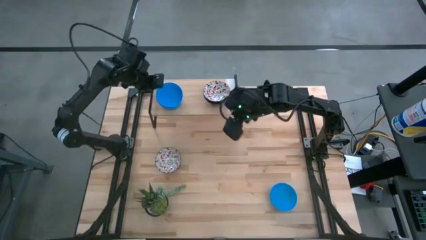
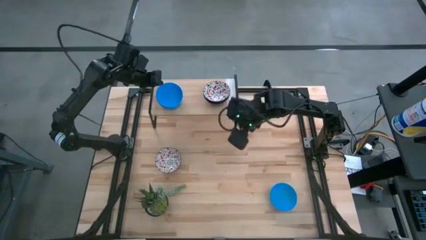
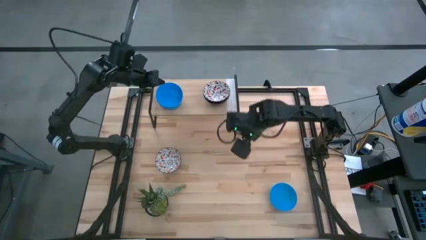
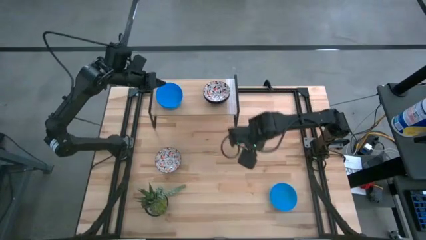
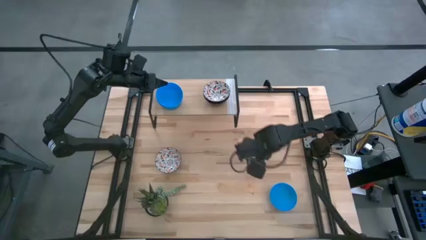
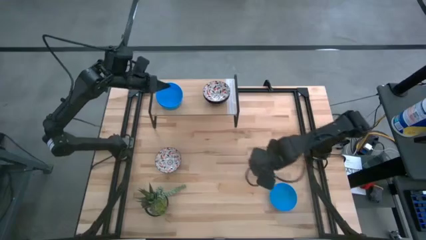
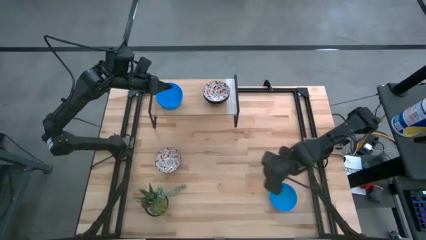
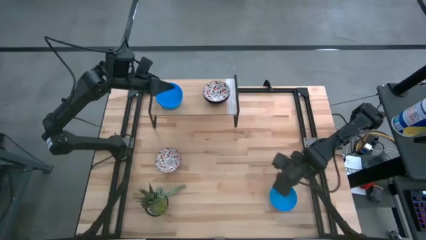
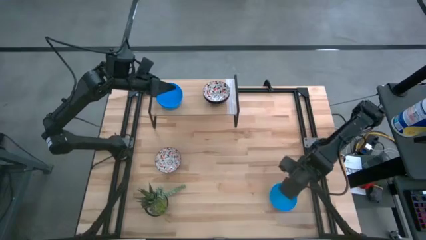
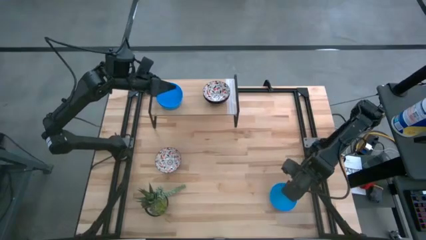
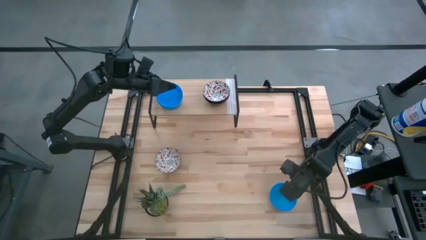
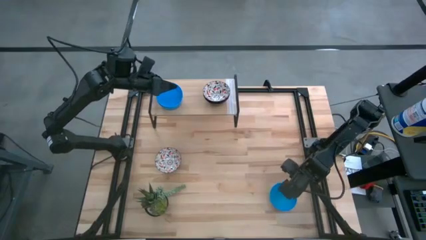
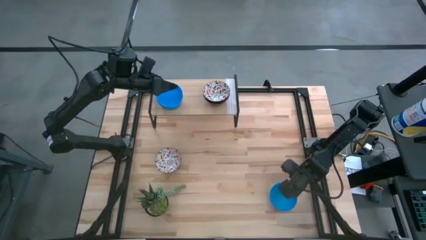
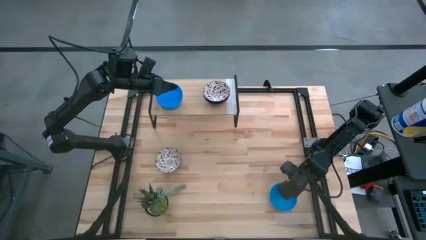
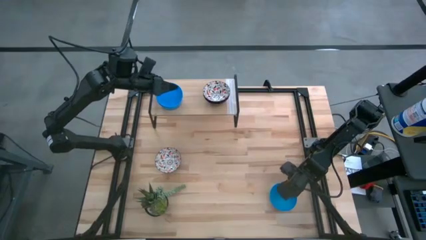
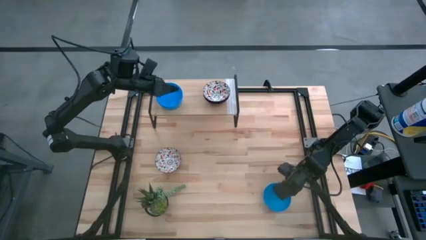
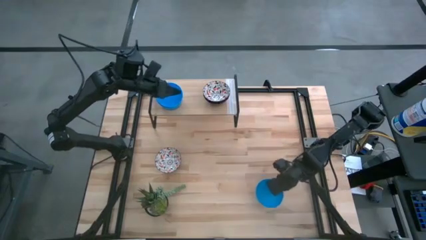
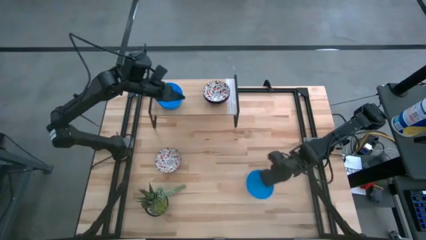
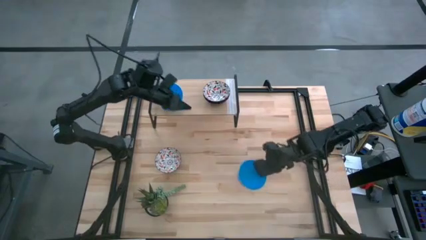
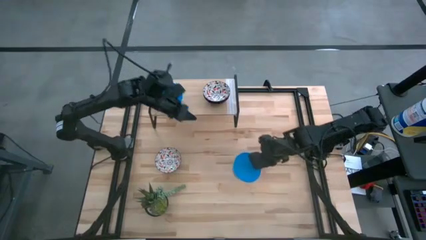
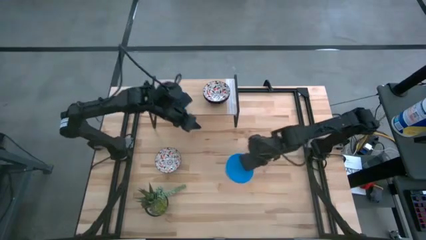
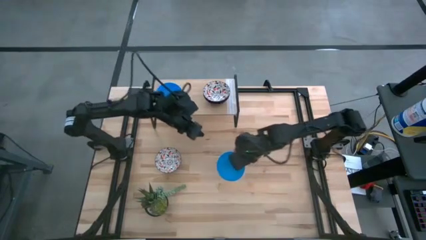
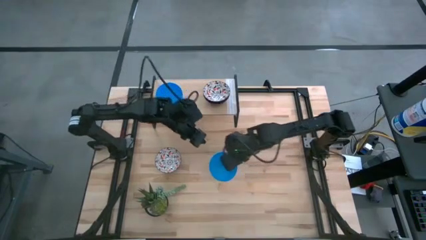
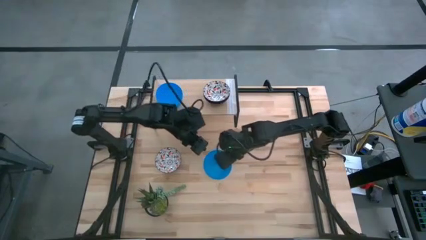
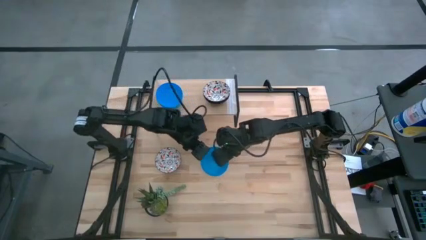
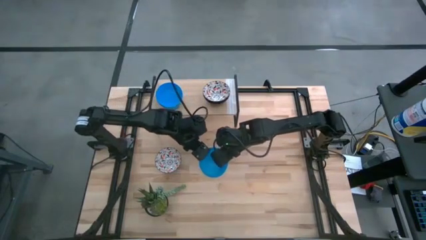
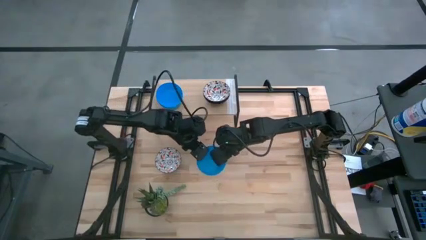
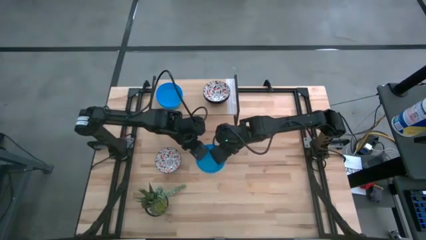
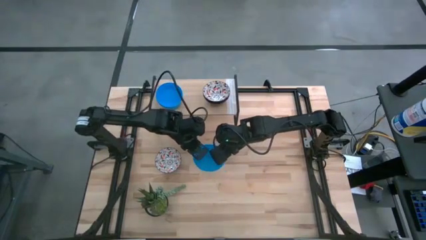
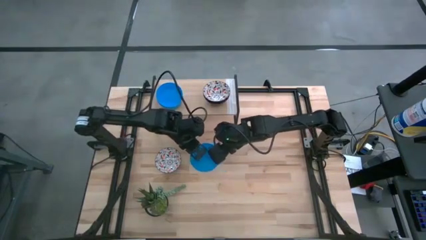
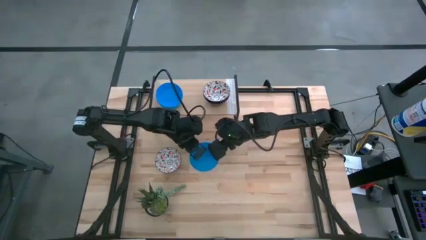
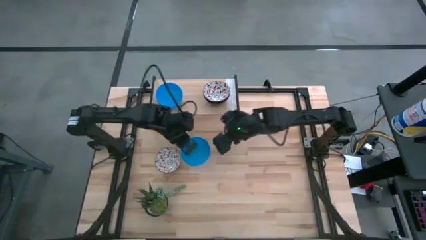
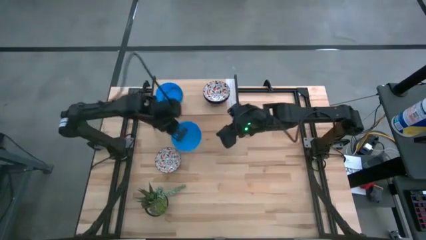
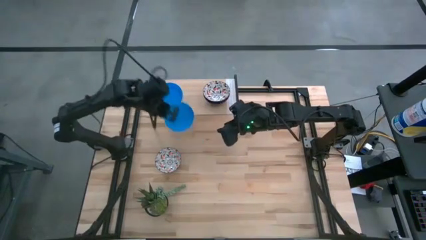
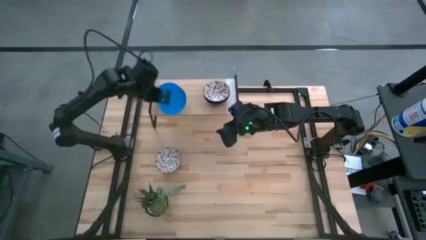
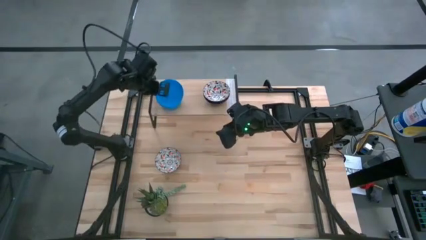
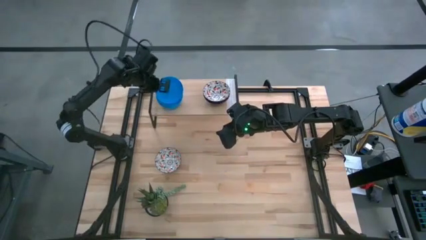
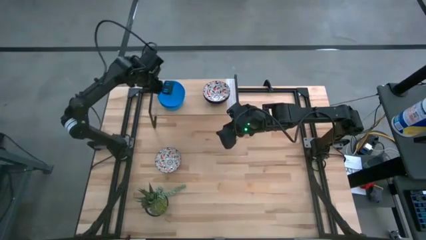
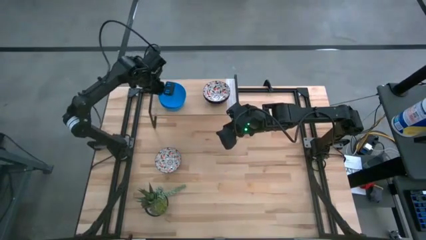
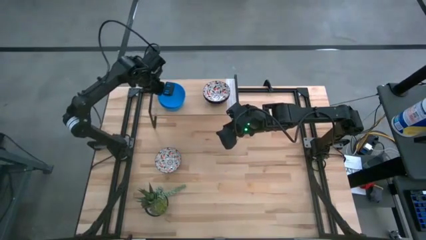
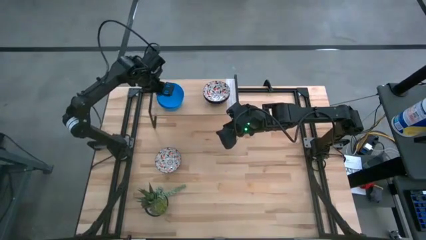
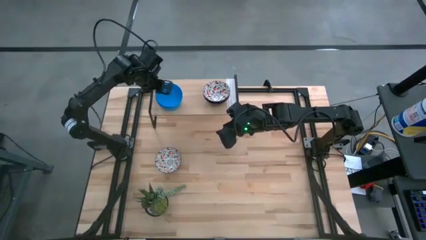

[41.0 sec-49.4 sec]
Task: Pick & Place Mini bowls
Stack the blue bowl on the blue bowls on the shelf

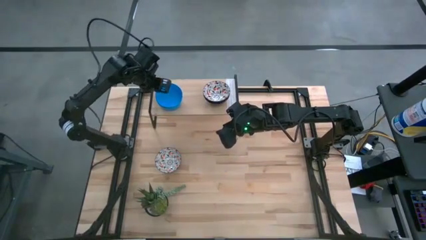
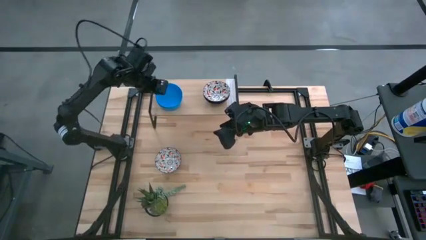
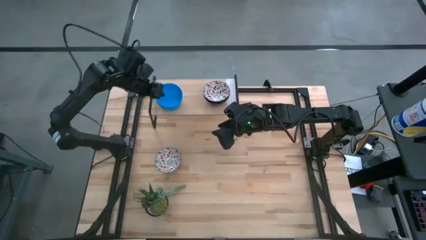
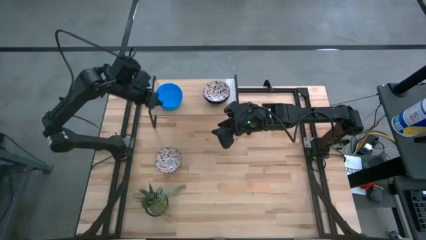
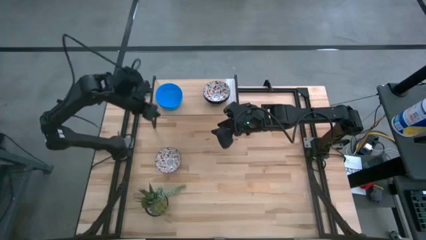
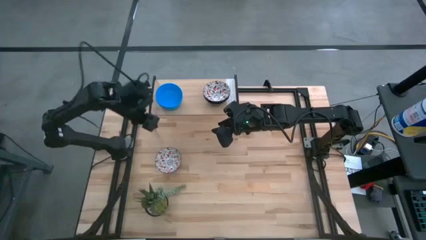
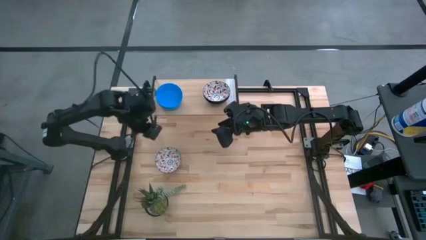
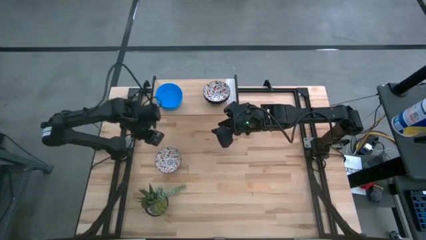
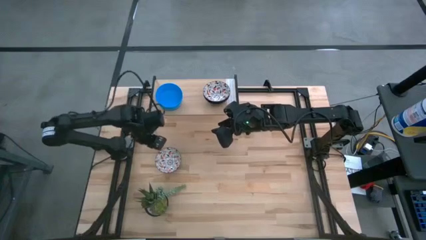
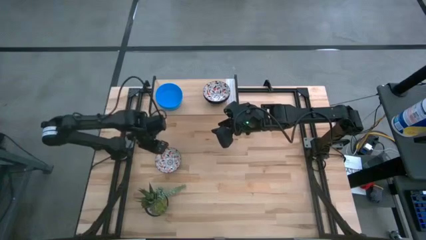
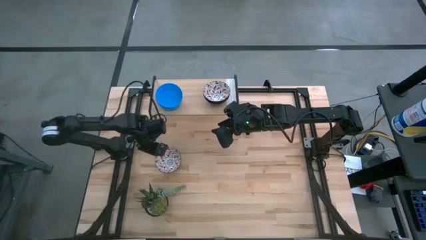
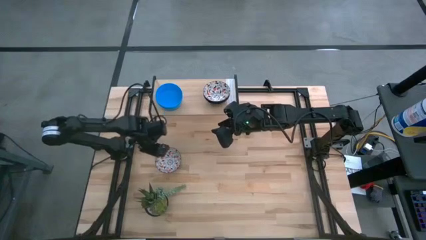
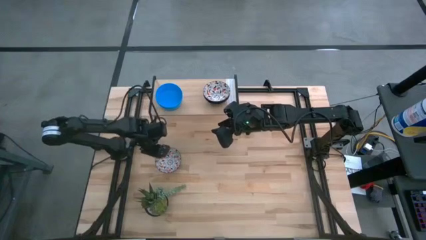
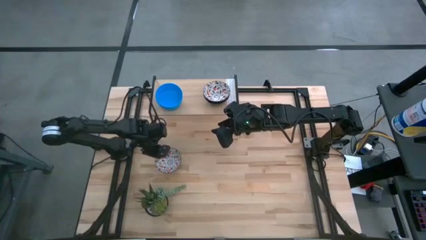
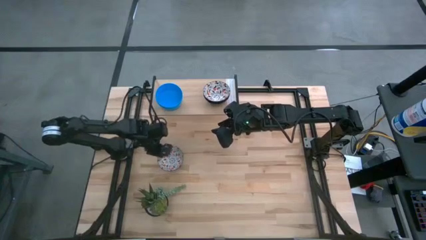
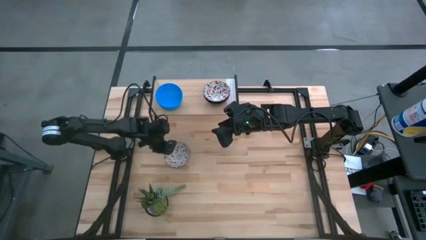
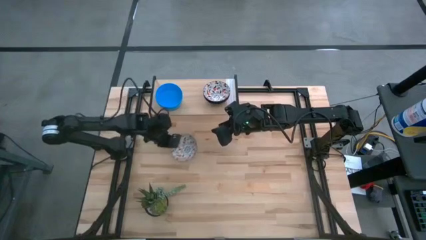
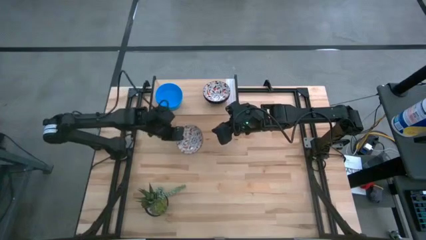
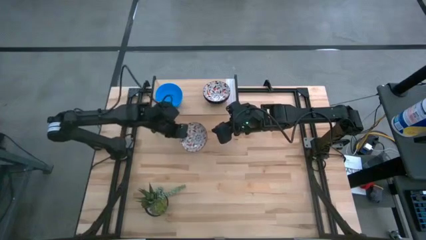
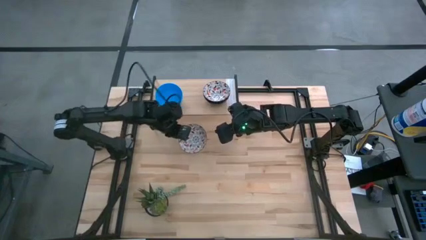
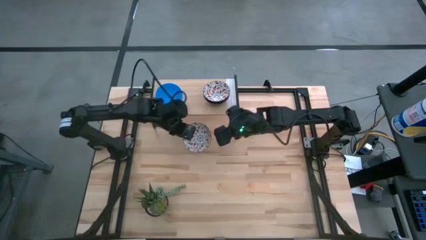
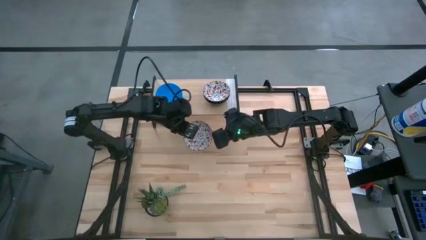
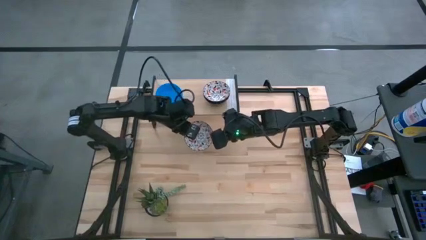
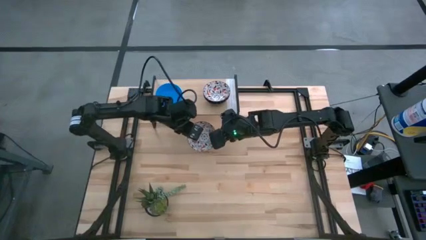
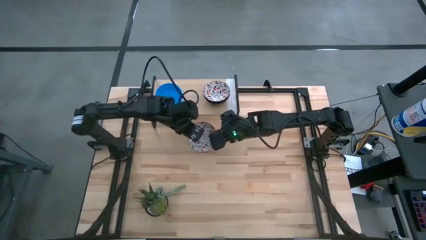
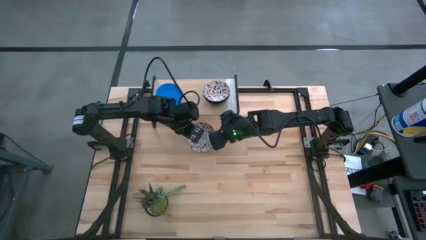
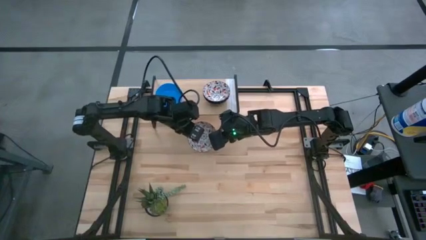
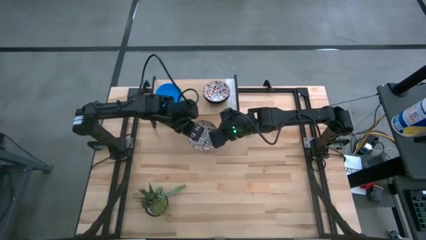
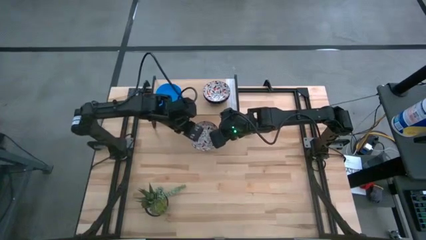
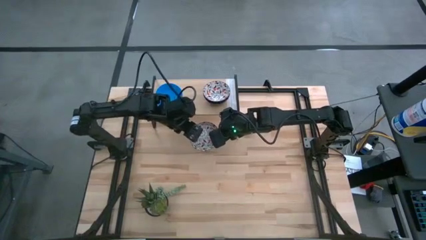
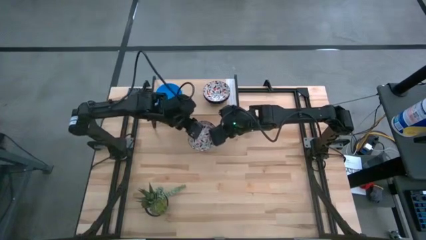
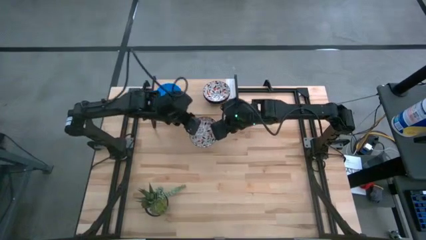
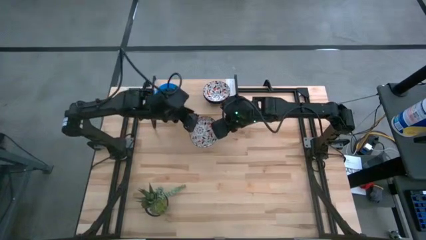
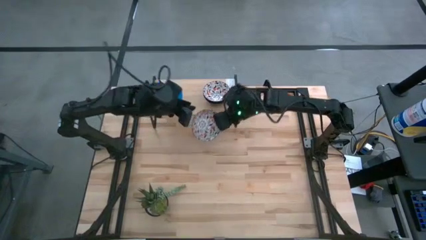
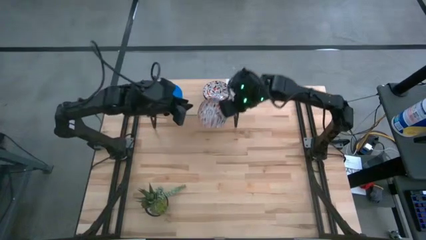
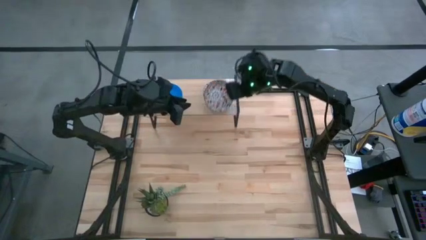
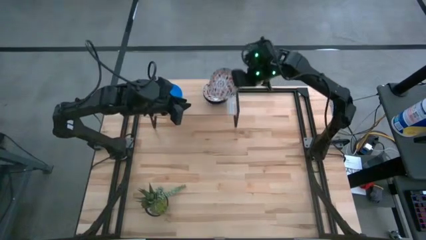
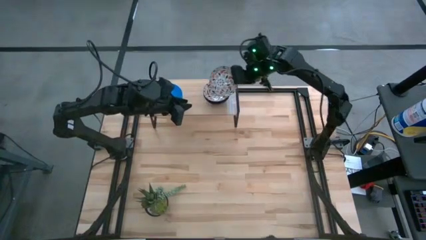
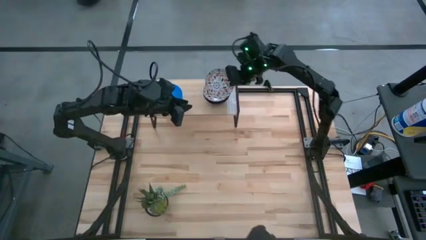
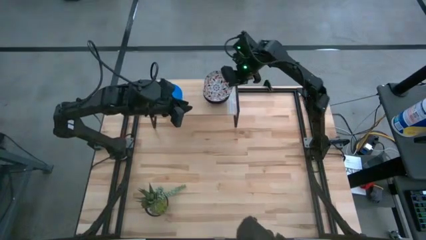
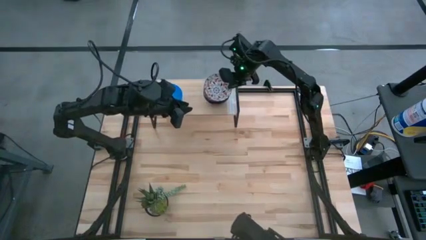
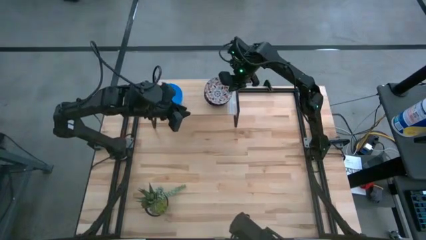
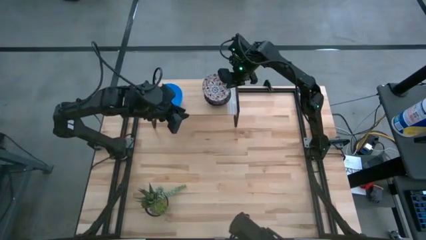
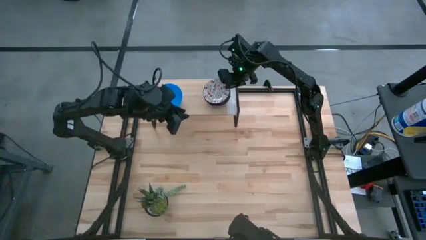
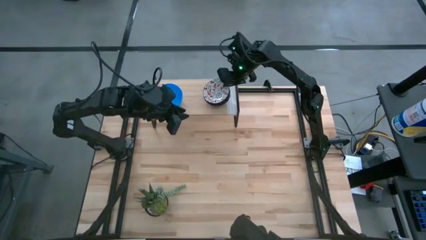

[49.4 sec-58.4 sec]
Stack the white patterned bowl on the white patterned bowls on the shelf
